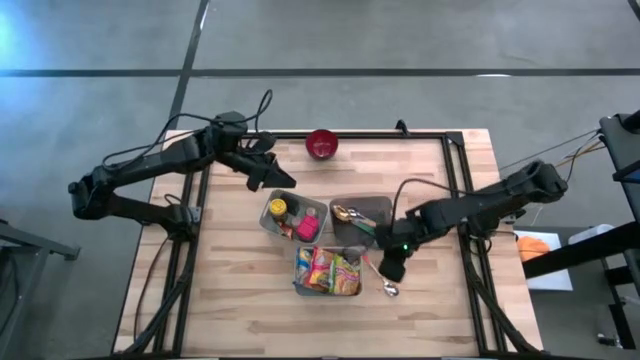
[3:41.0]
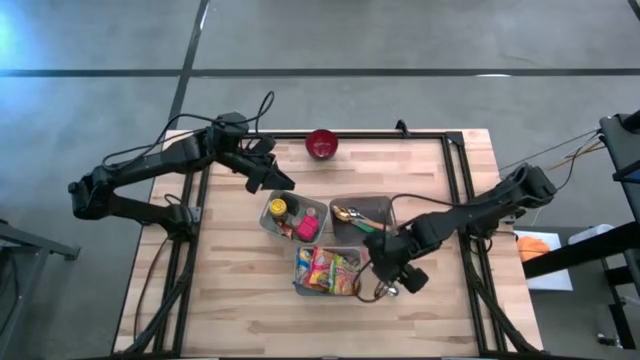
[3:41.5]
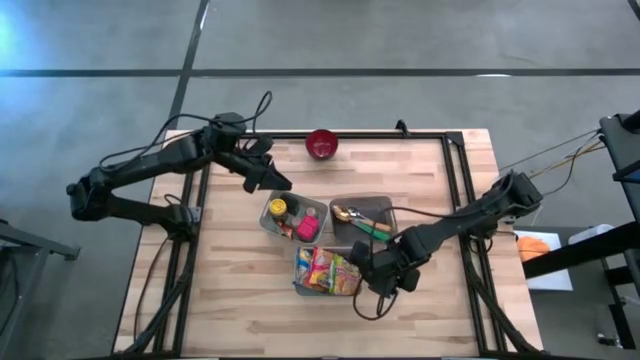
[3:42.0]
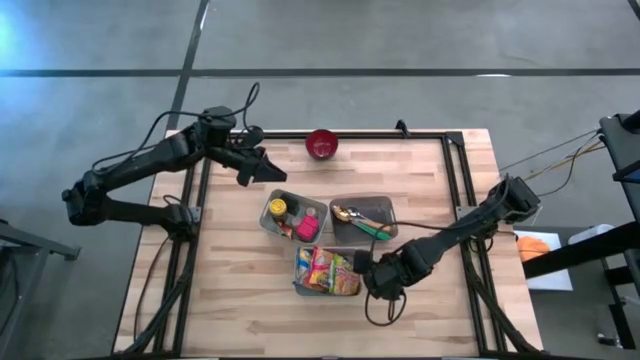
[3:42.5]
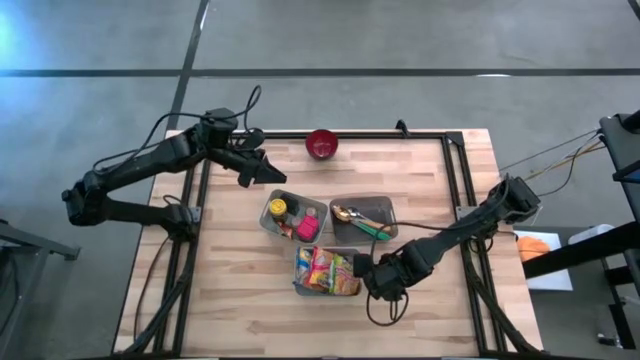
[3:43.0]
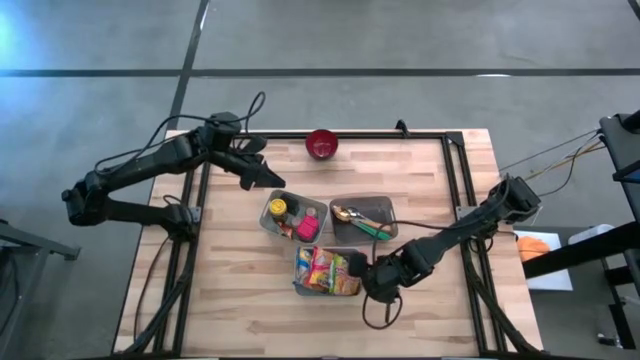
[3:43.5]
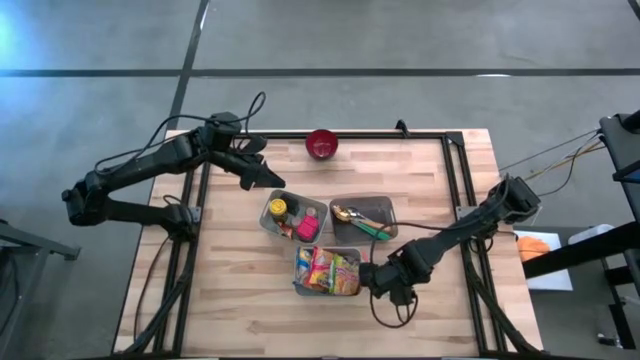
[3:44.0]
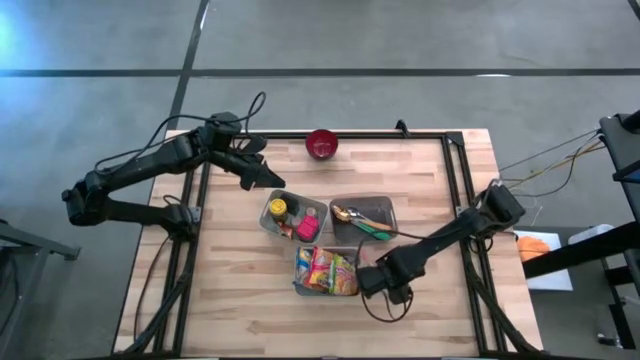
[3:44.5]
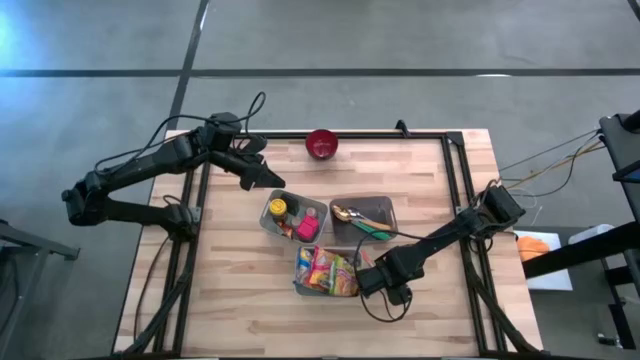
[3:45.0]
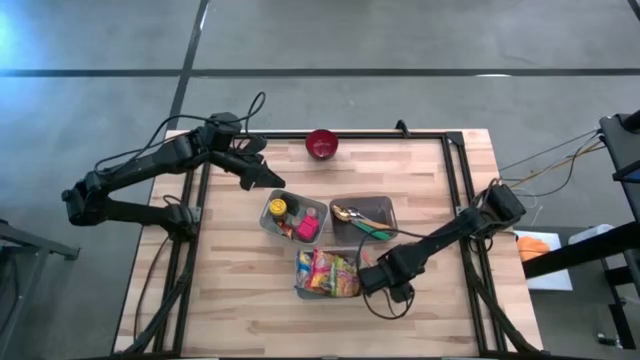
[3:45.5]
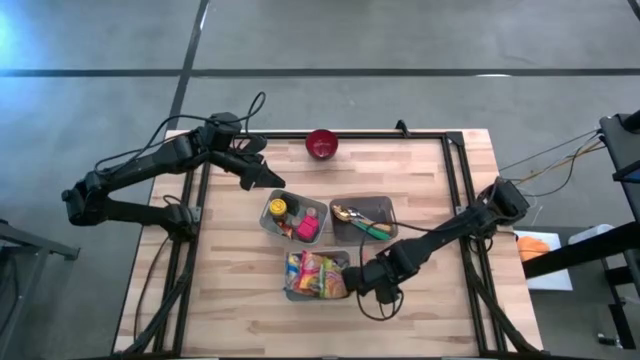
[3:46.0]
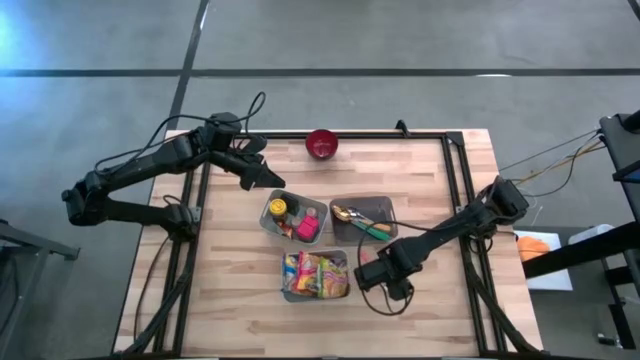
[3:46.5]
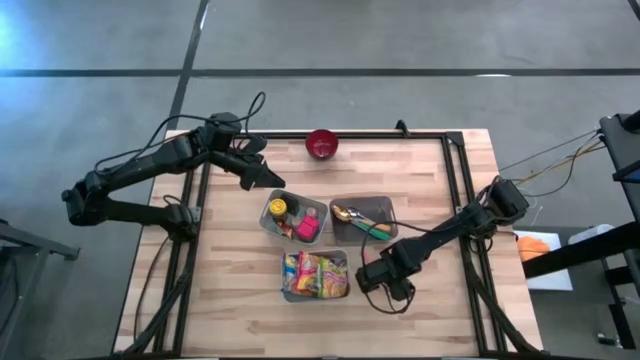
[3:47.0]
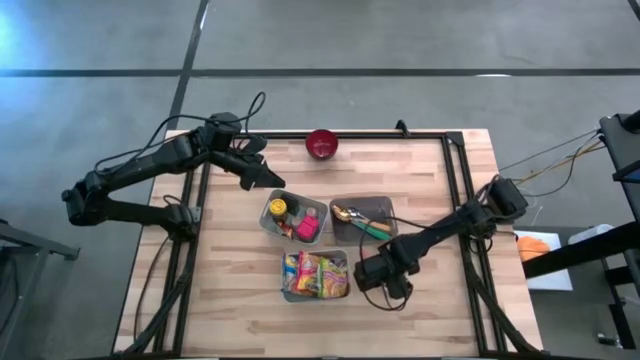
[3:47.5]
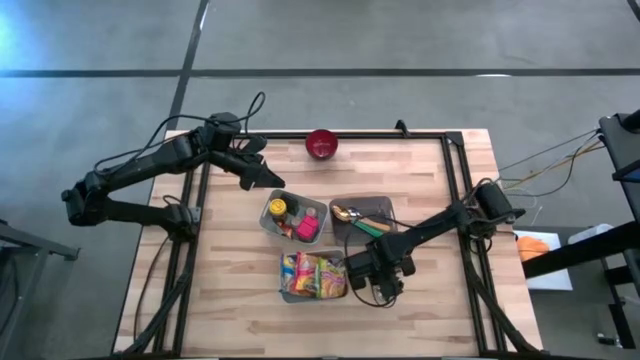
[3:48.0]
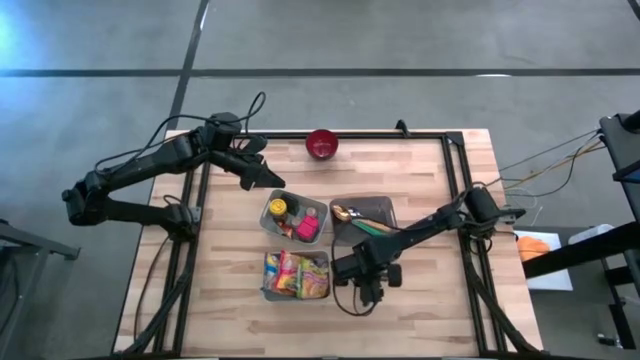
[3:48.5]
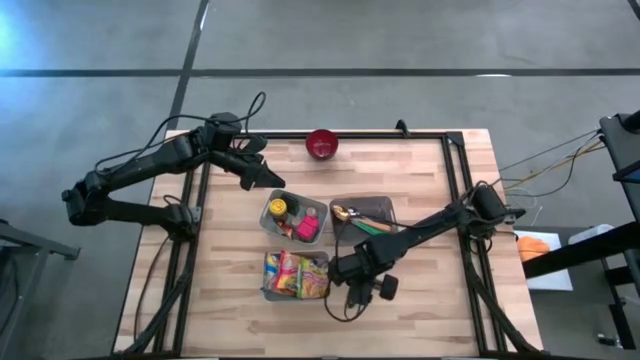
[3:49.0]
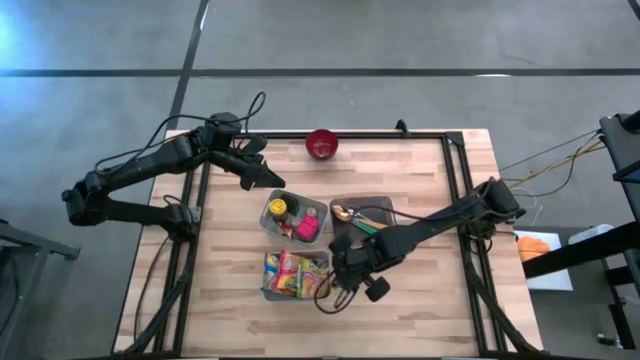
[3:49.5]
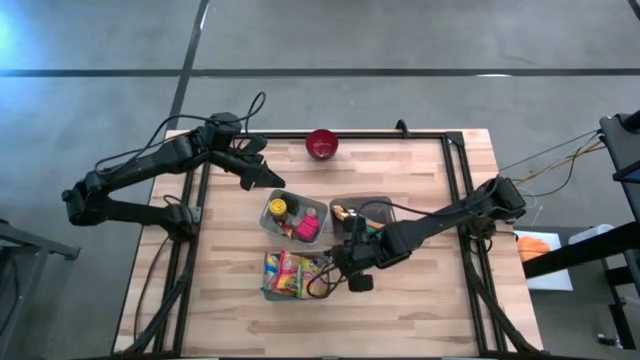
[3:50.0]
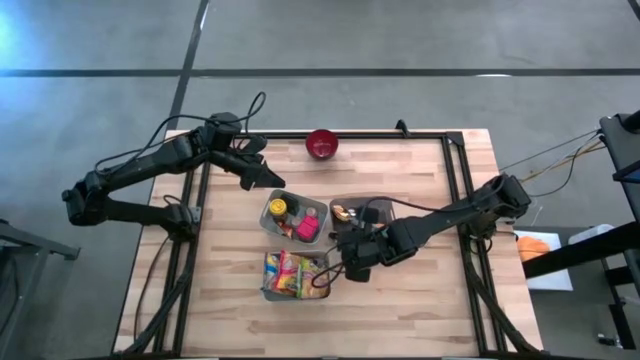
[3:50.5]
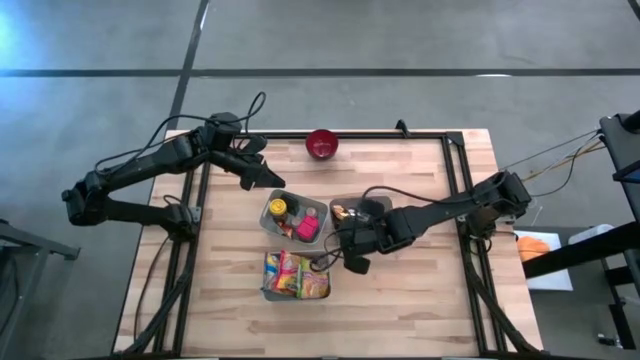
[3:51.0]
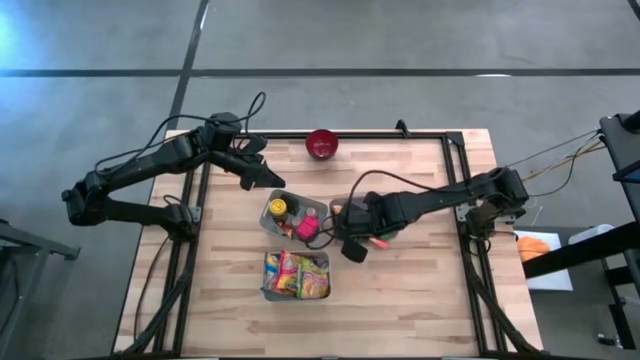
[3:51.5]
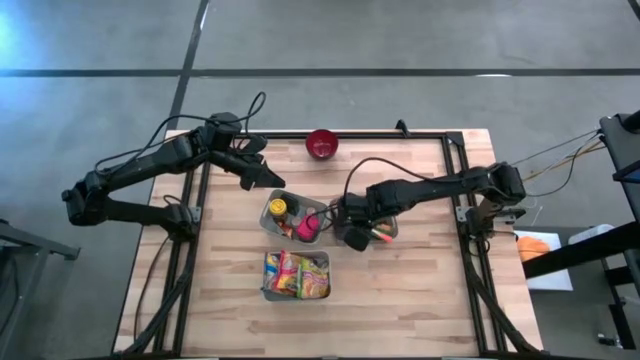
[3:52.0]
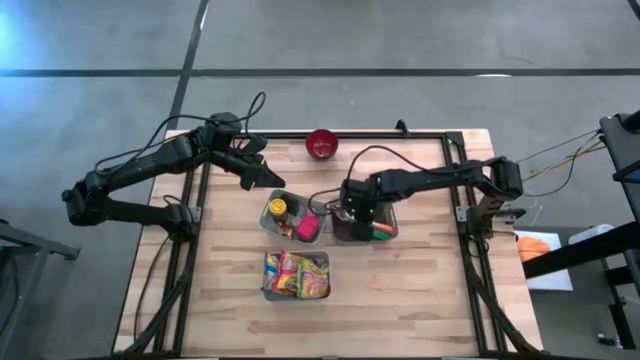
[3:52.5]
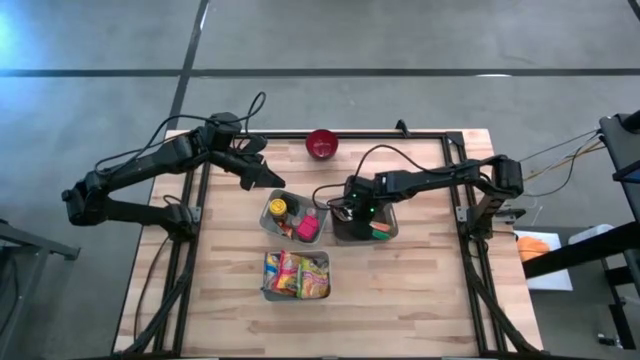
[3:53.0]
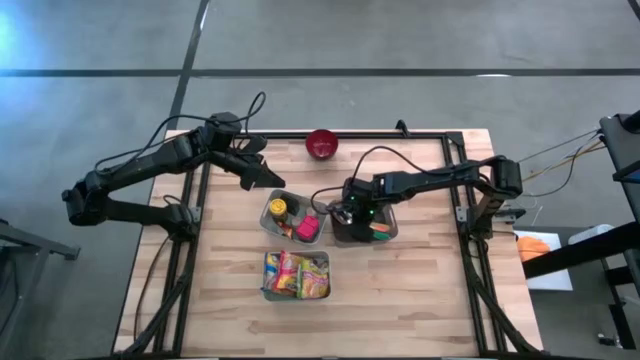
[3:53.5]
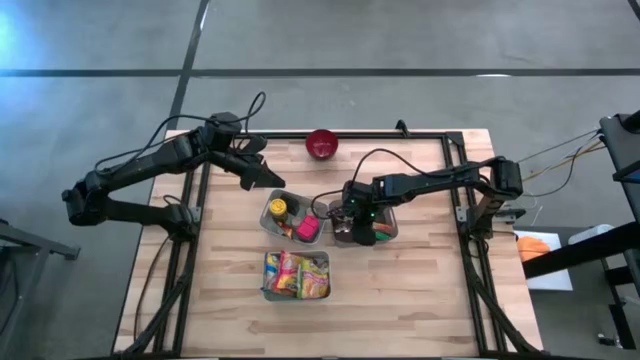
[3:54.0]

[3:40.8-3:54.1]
Put the orange spoon into the black bin

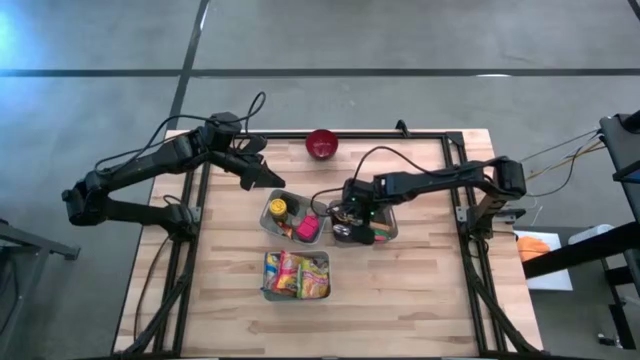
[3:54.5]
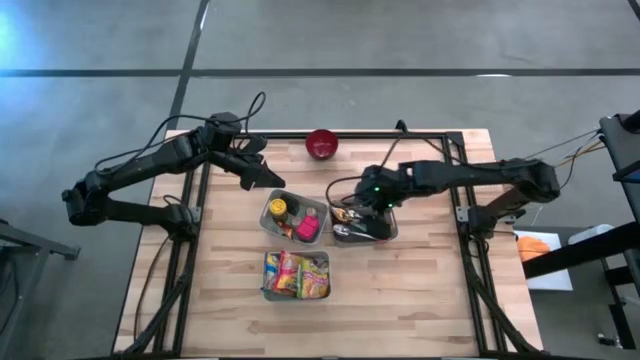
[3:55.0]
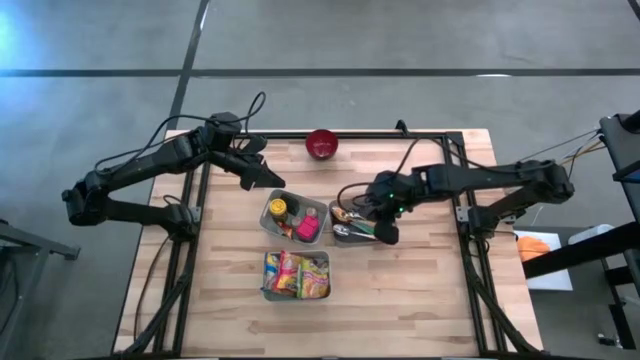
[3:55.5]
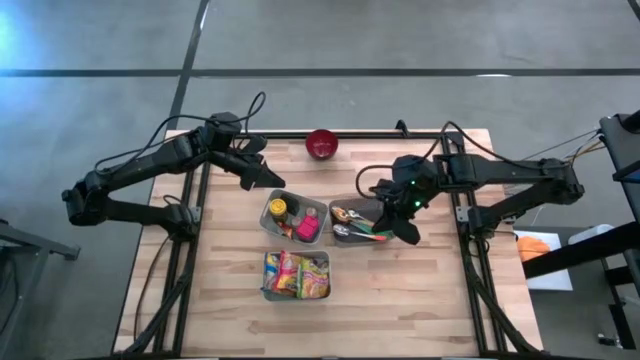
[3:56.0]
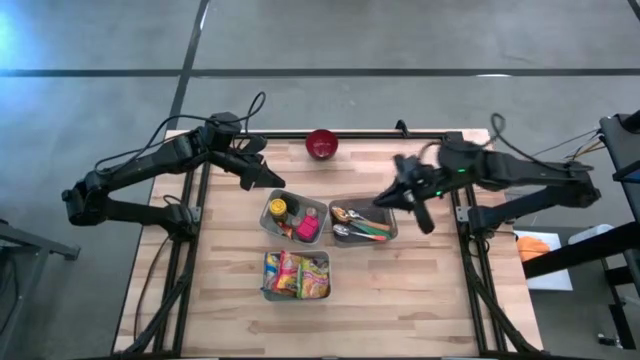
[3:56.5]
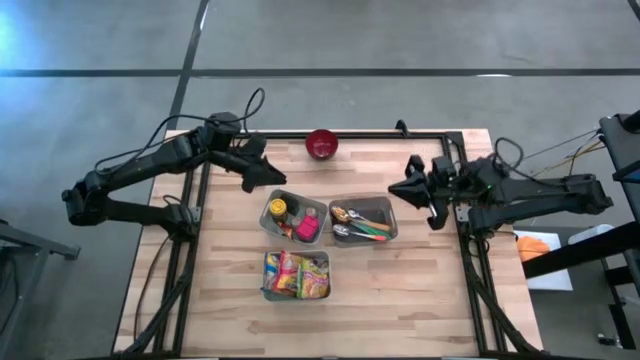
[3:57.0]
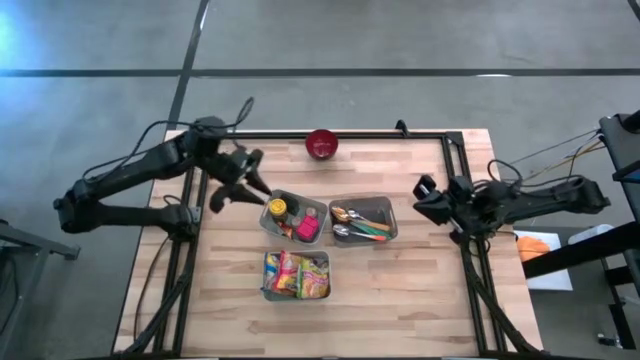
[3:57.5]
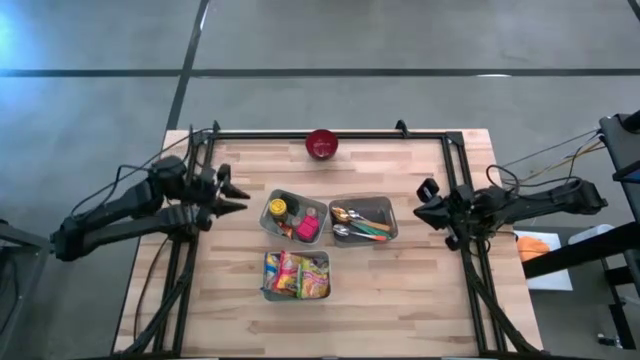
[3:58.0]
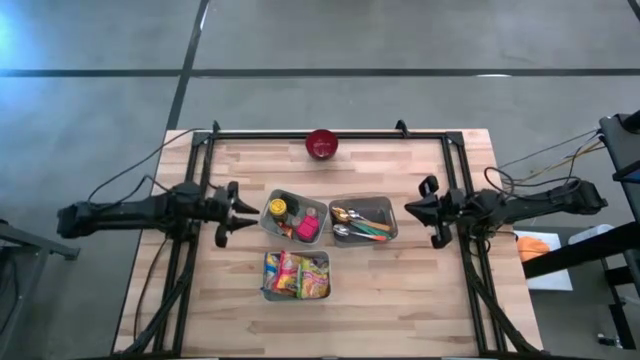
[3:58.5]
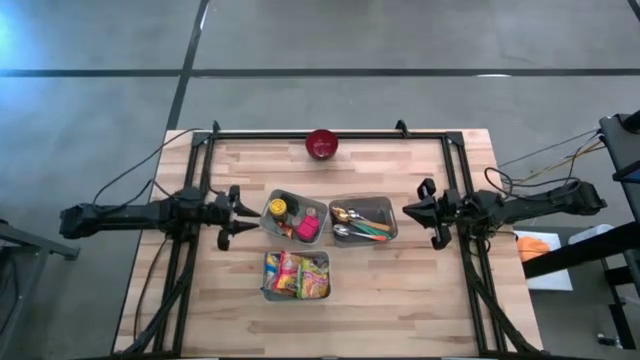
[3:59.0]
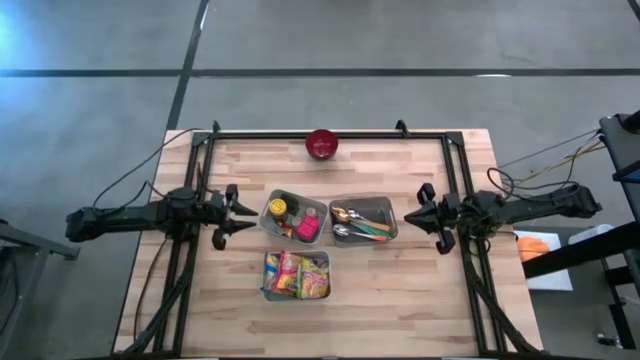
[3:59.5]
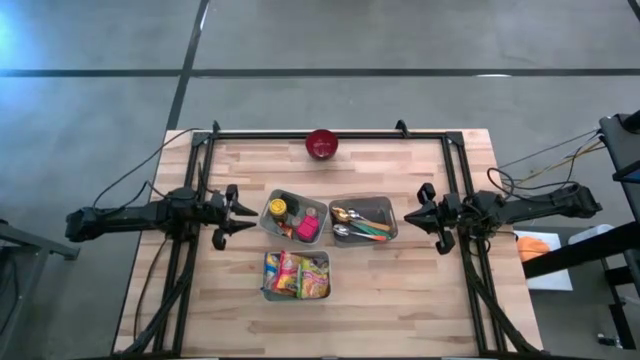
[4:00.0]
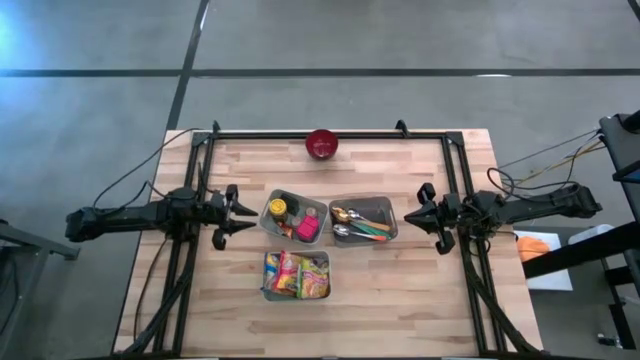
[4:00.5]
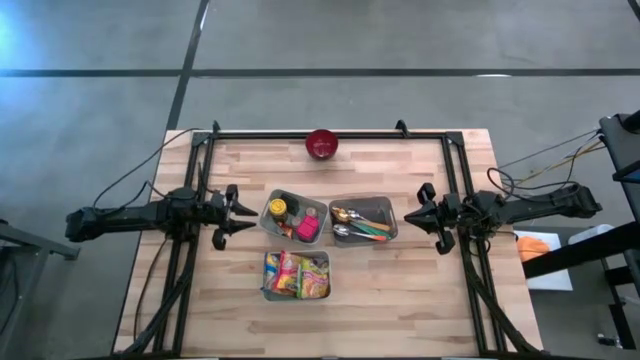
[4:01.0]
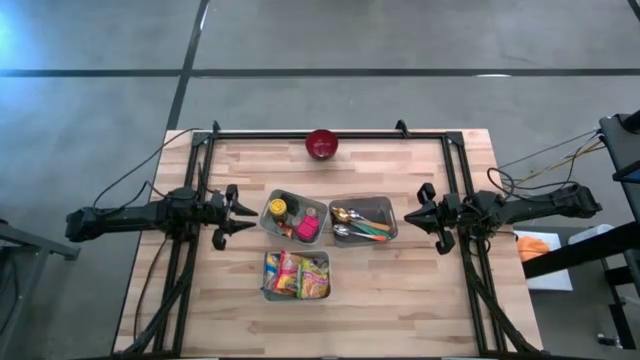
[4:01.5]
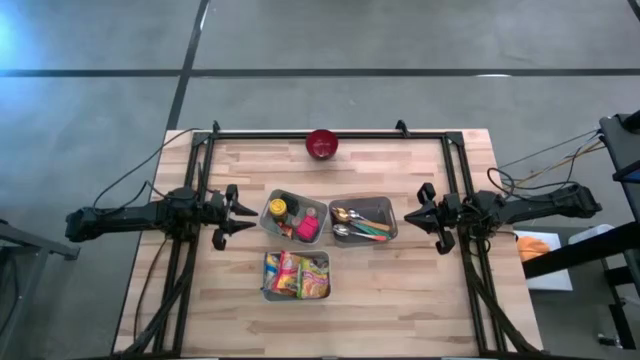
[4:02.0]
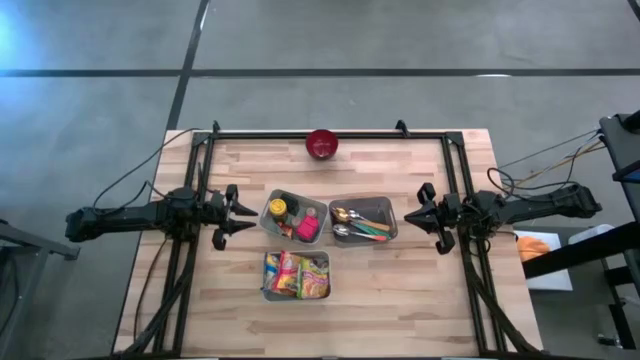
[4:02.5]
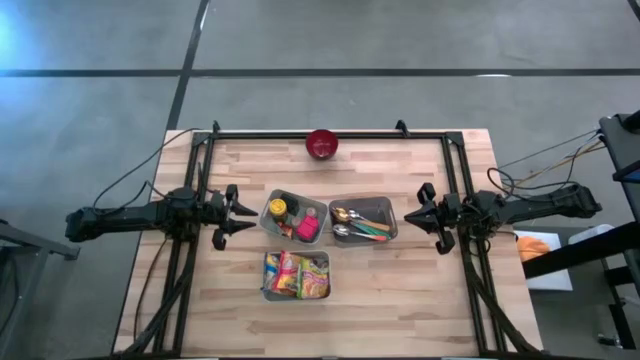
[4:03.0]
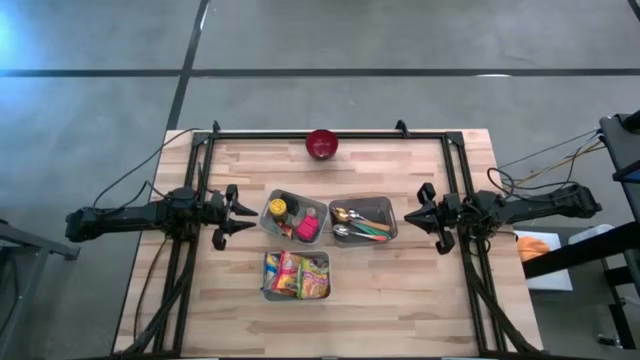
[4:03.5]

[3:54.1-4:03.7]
Return to Home Position
